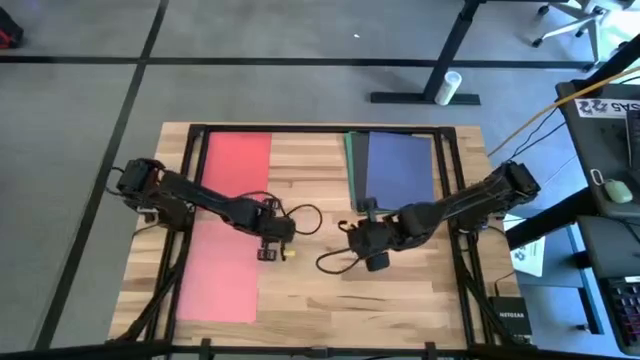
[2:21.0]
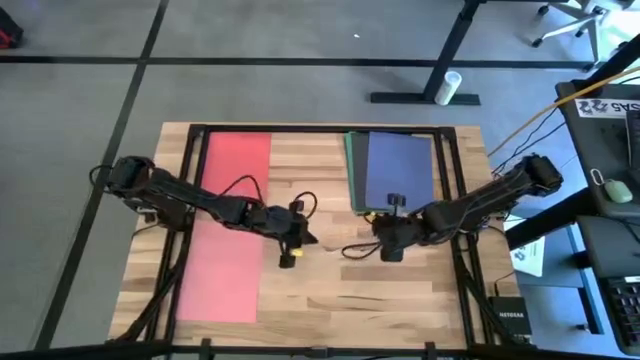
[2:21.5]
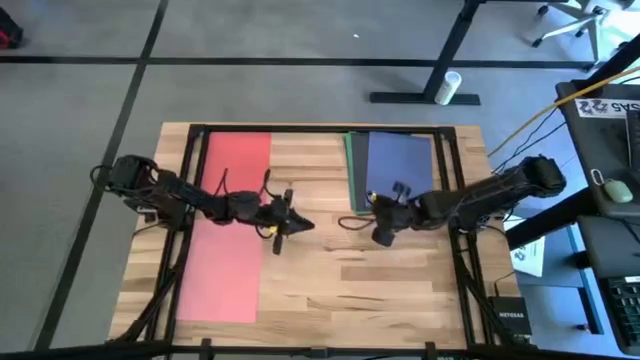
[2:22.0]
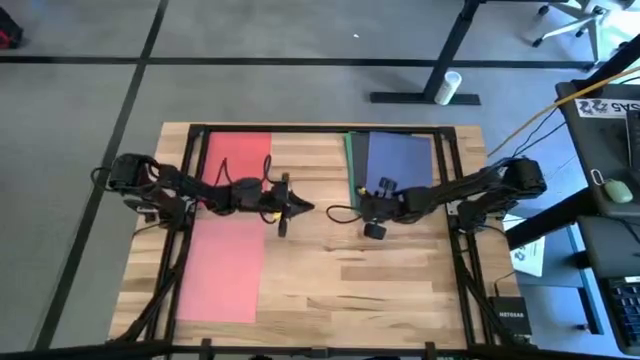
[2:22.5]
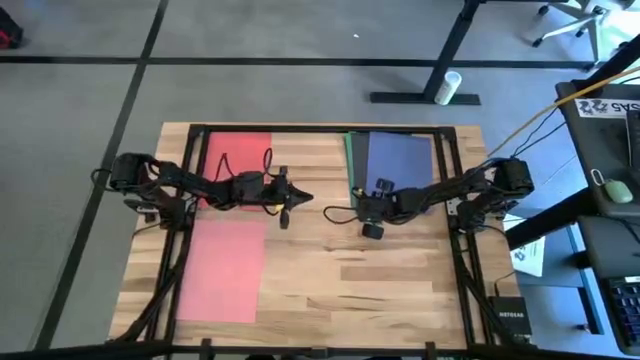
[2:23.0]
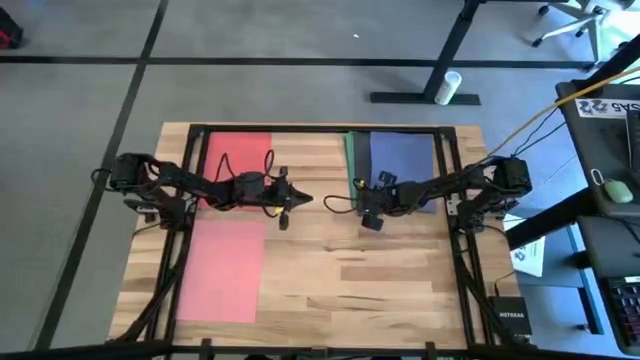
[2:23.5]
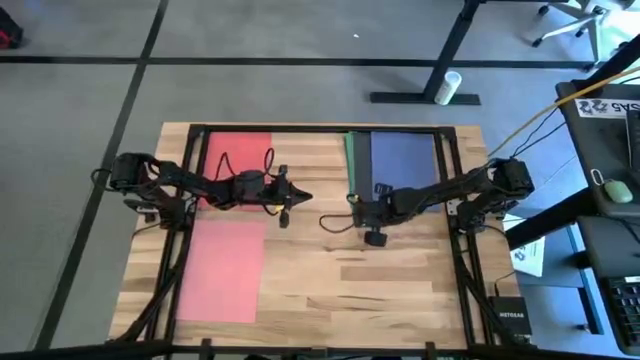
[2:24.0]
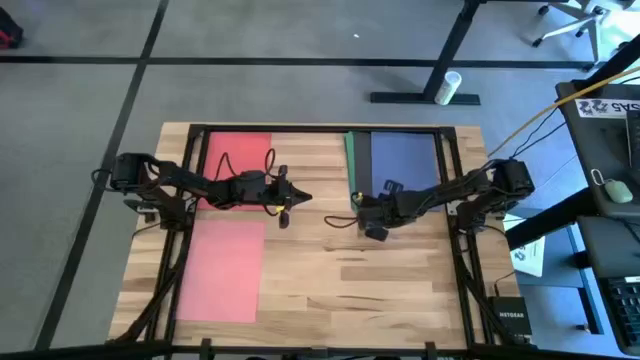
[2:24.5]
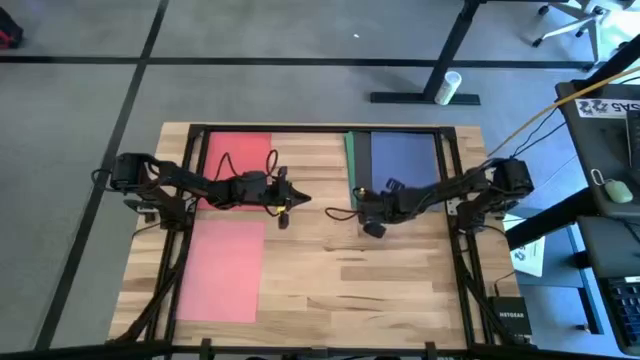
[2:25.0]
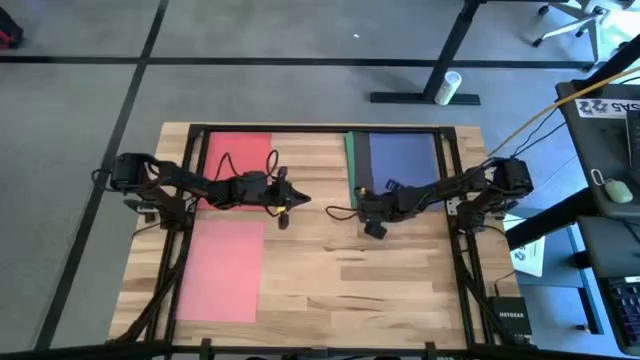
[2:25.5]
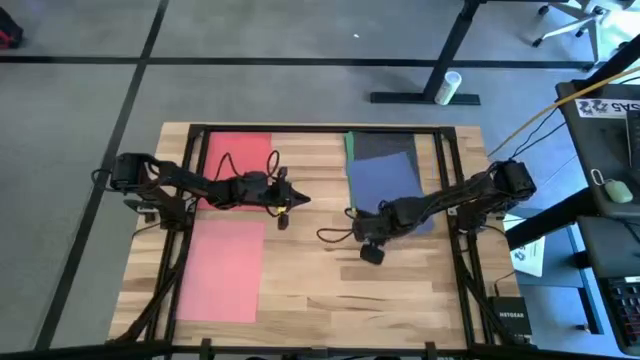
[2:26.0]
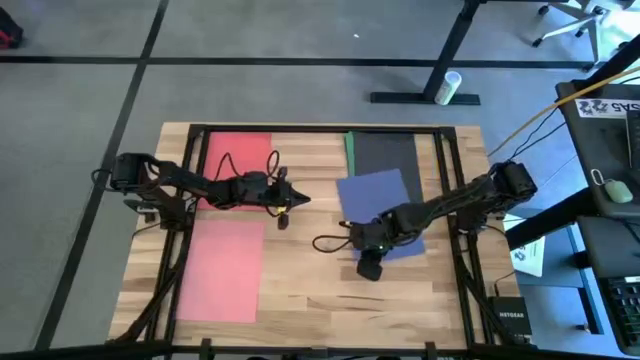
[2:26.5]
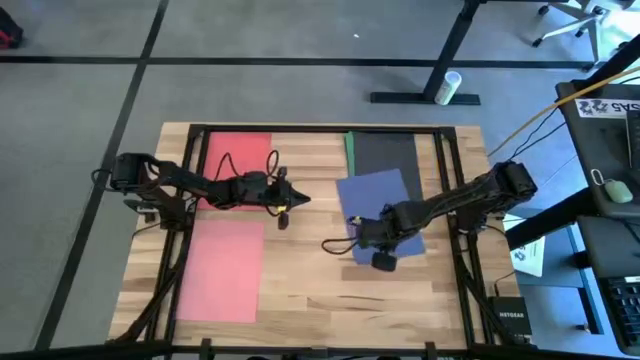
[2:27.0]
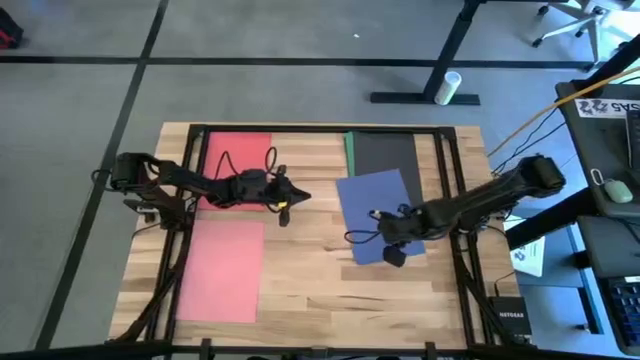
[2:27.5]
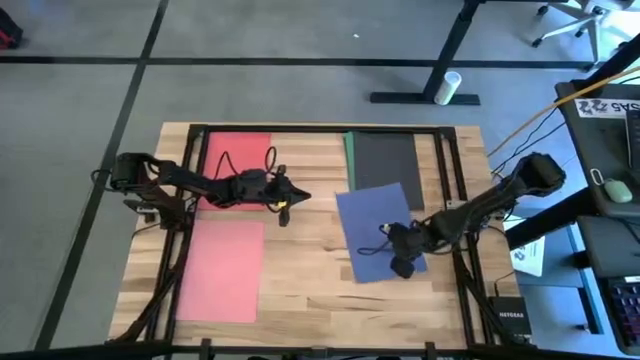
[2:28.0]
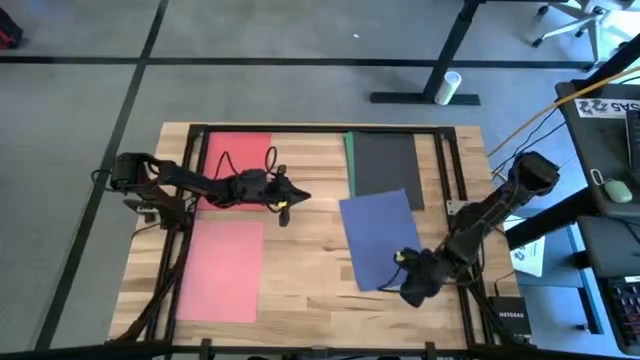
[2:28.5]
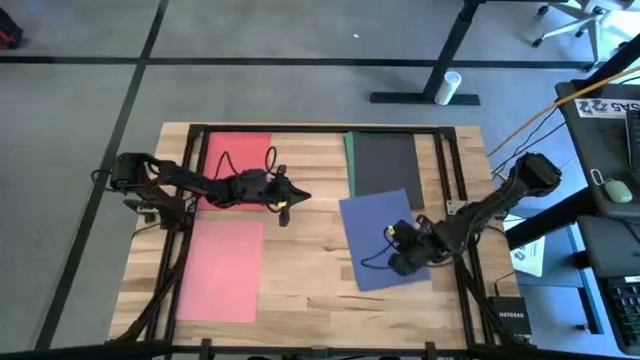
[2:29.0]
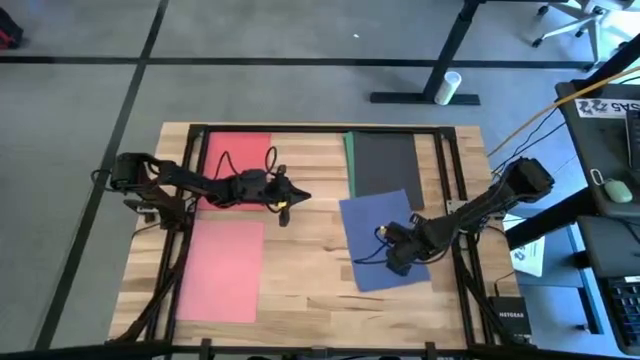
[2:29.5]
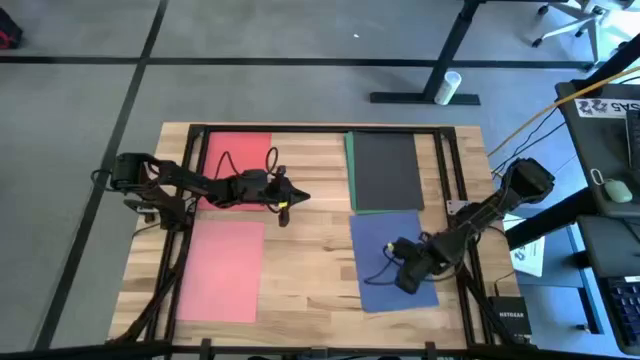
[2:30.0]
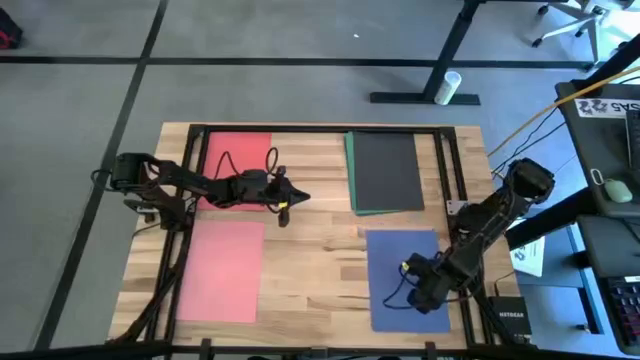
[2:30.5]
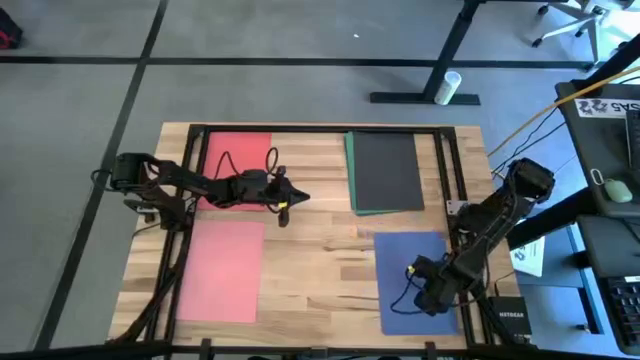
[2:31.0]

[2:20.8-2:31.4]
Task: Organize paper
Put the violet paper on the bottom right of the table

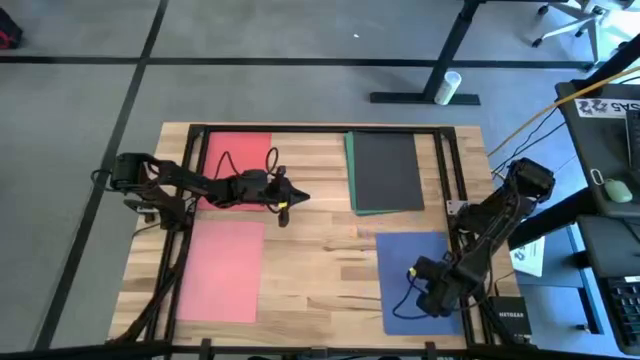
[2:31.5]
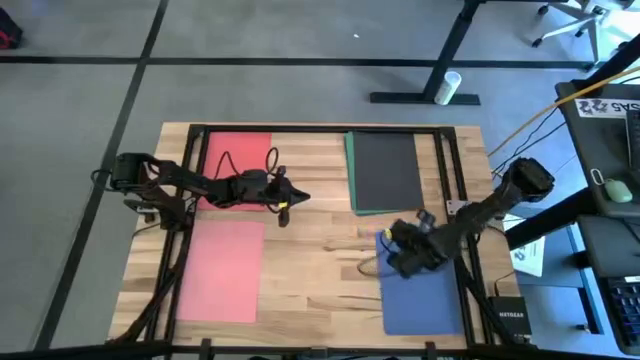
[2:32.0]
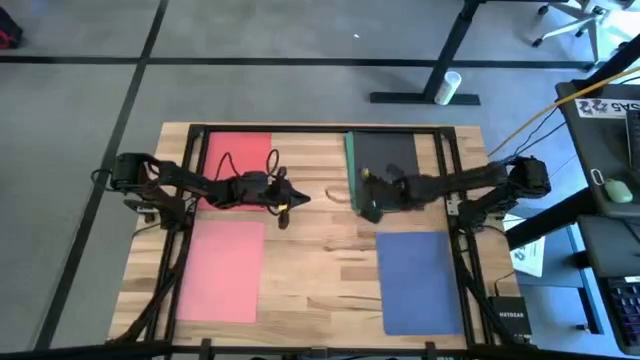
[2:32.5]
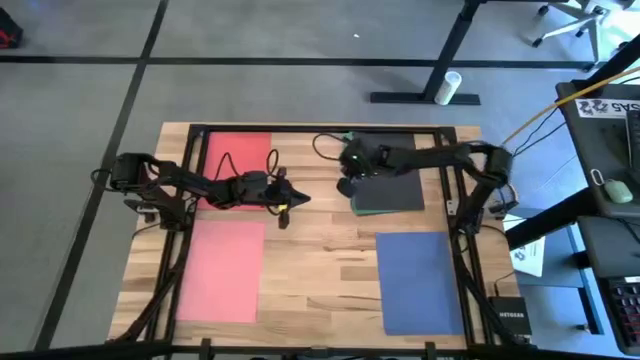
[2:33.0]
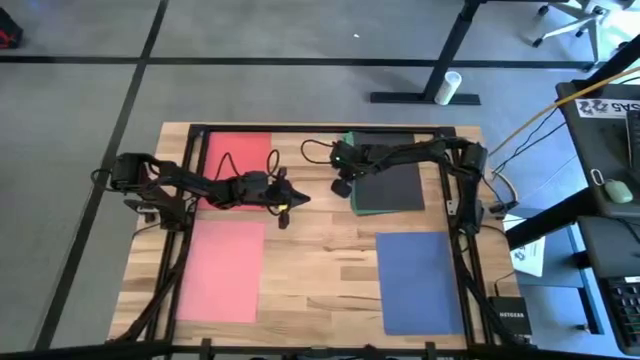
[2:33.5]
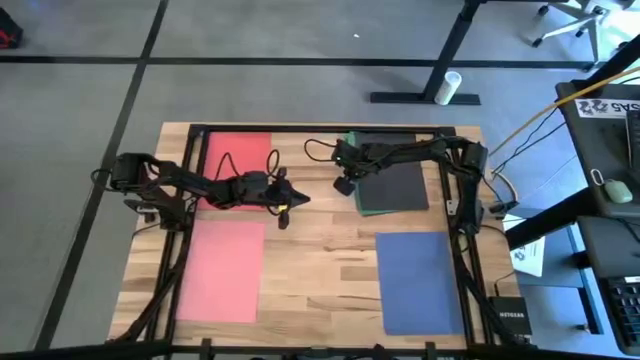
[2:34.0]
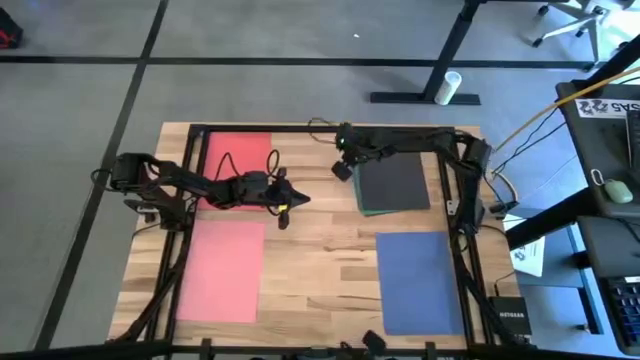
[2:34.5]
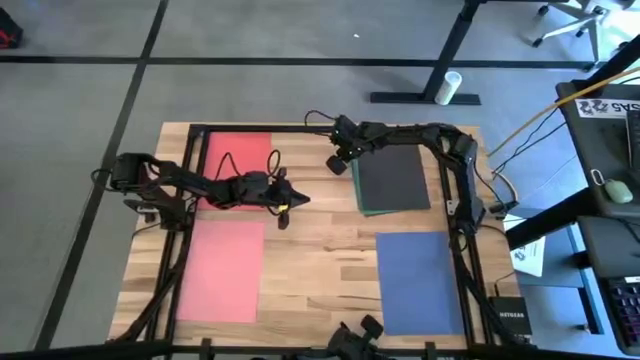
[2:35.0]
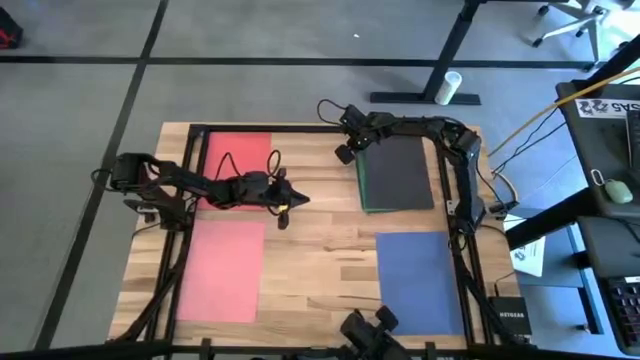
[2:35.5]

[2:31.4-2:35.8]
Adjust the stacked papers

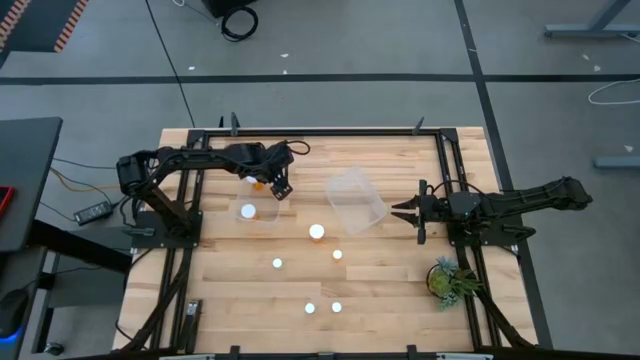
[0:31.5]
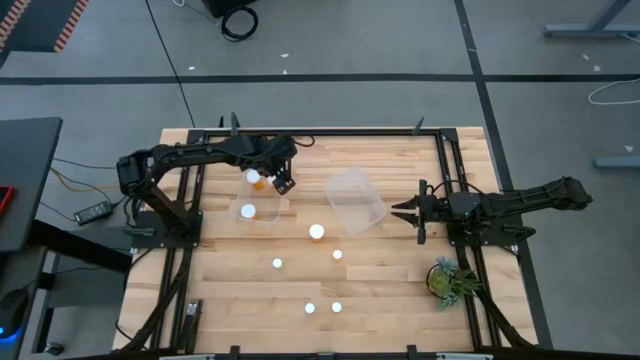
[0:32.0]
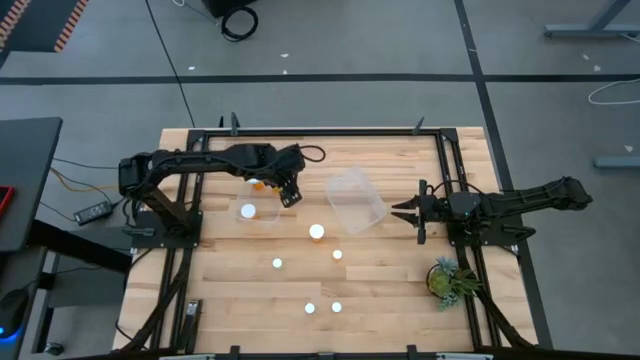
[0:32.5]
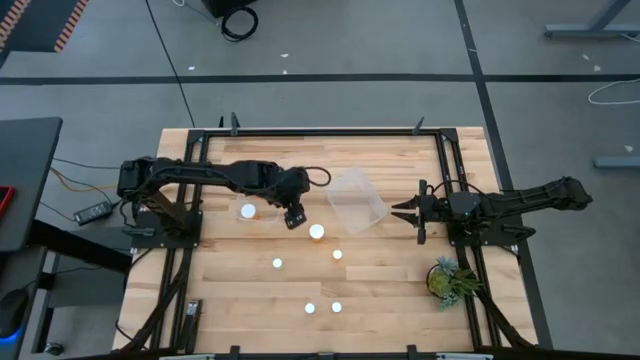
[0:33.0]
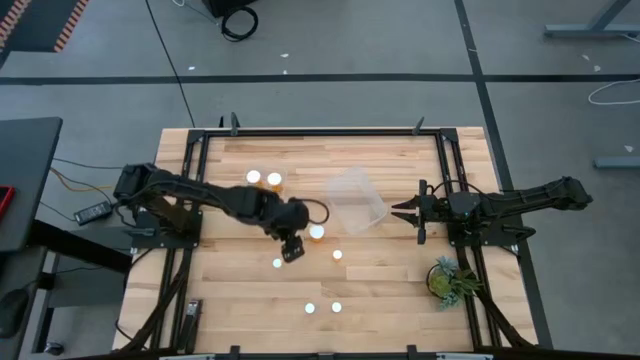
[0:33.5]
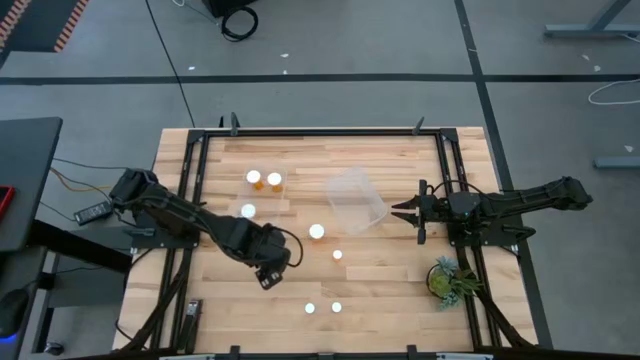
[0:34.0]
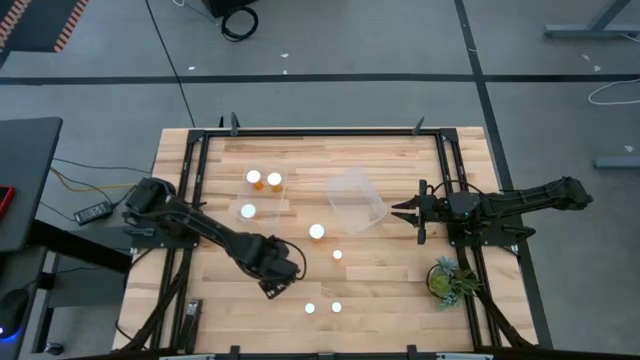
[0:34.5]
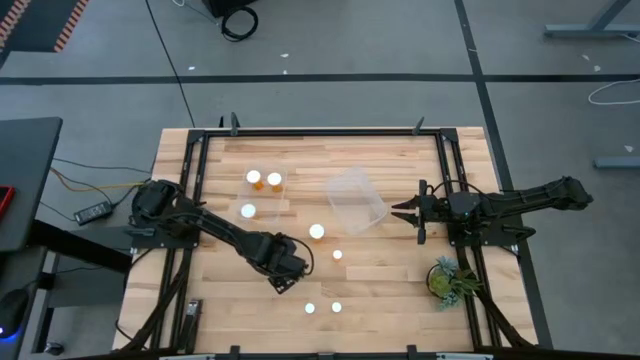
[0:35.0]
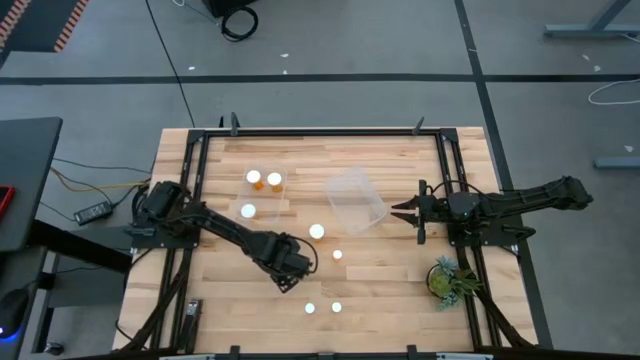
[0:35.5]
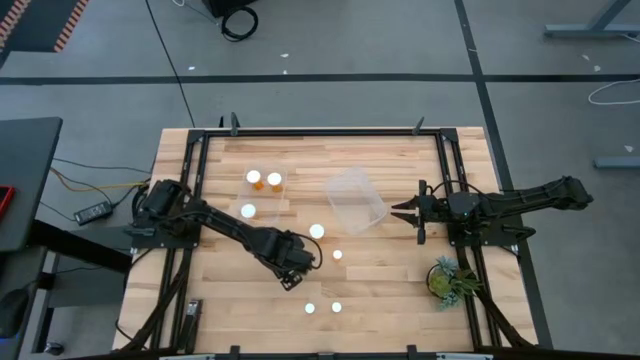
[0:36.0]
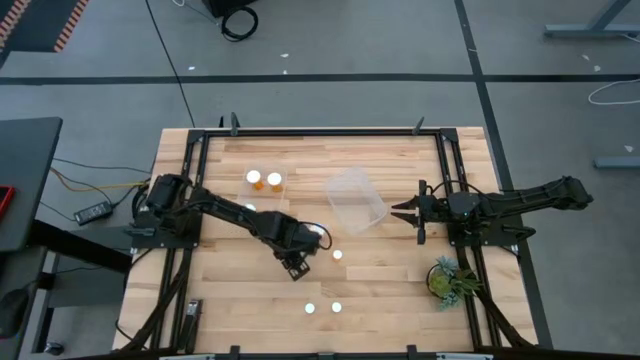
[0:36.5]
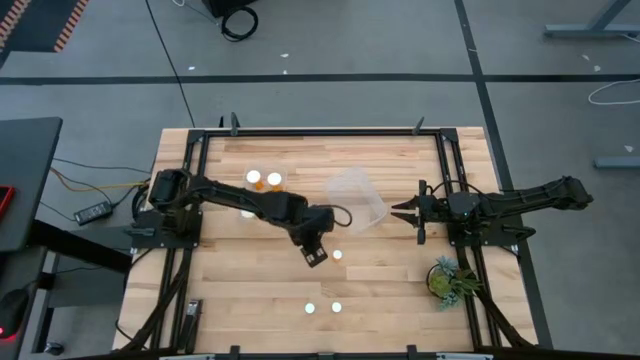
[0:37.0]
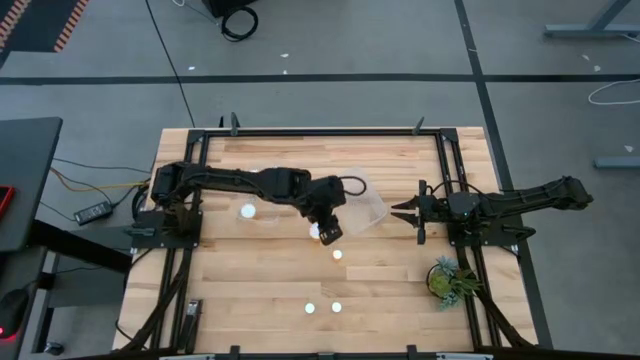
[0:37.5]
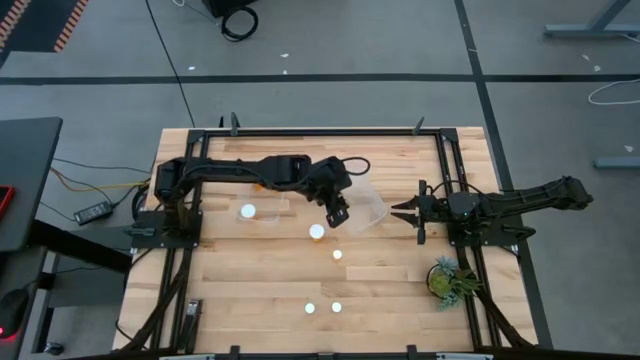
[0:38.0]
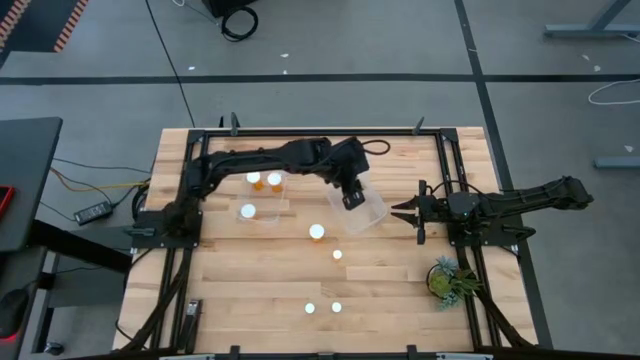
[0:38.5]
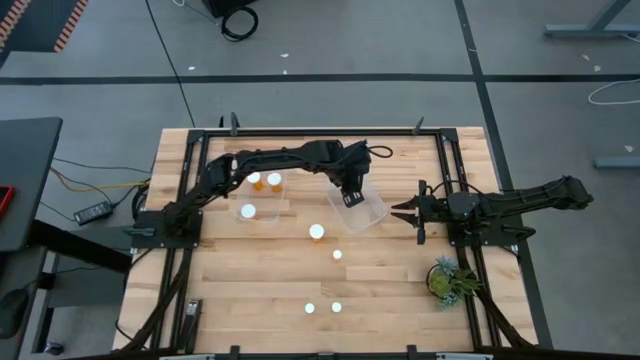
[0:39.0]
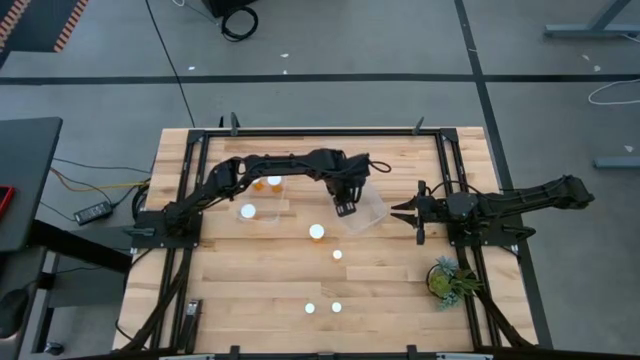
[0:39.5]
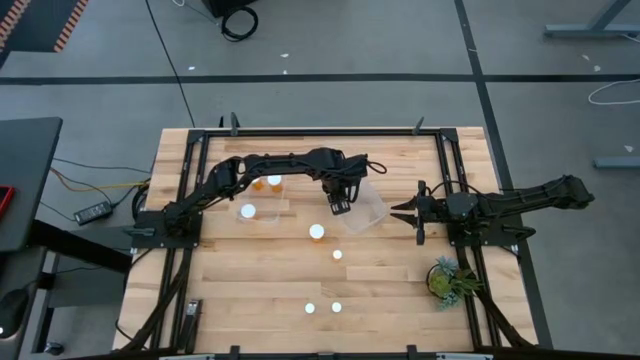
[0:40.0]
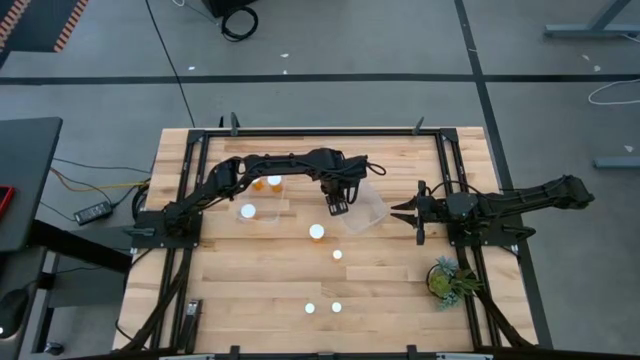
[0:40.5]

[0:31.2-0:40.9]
Task: Pick and place medicine bottles into bin by pill shape (circle, oval)
Put the small yellow pill bottle into the right transparent bin
